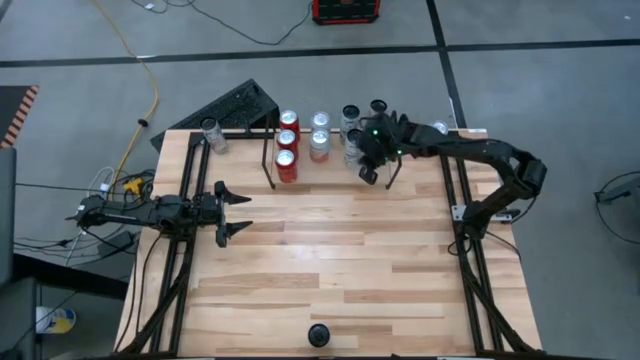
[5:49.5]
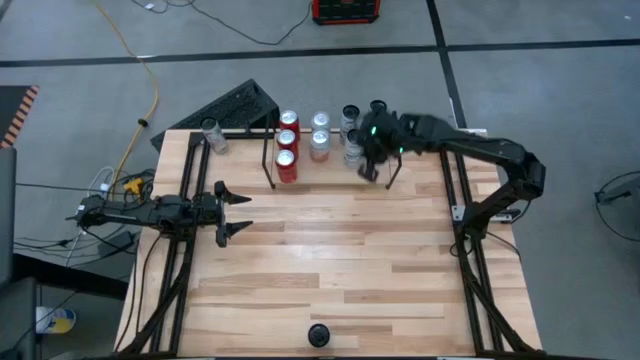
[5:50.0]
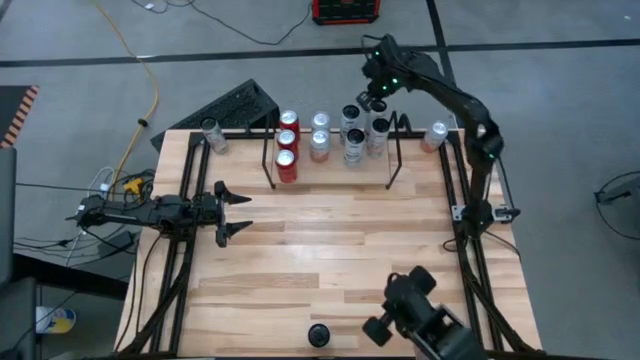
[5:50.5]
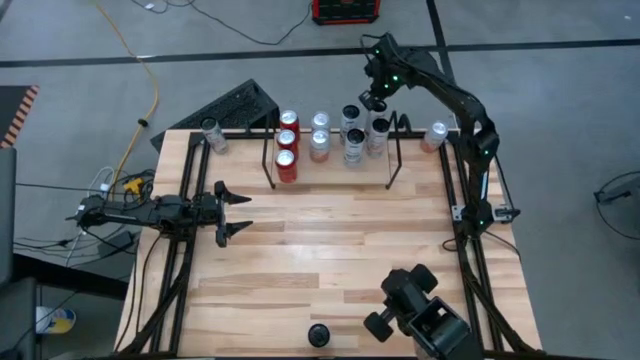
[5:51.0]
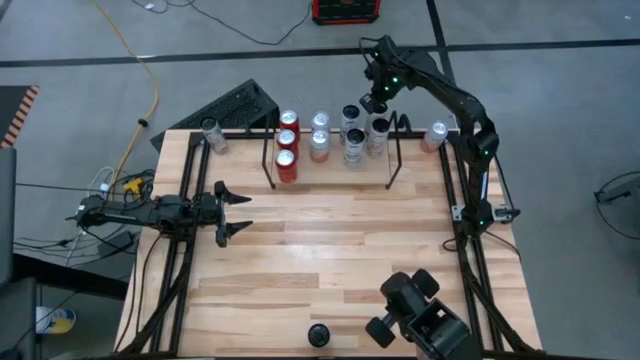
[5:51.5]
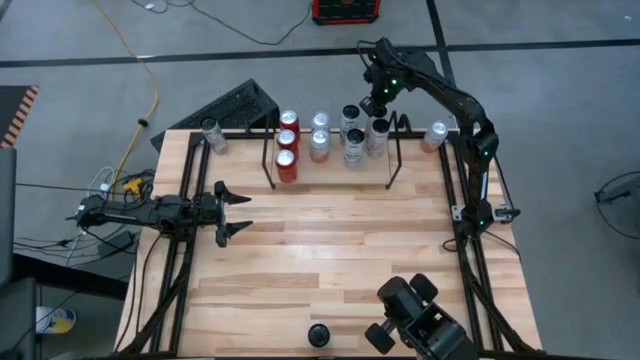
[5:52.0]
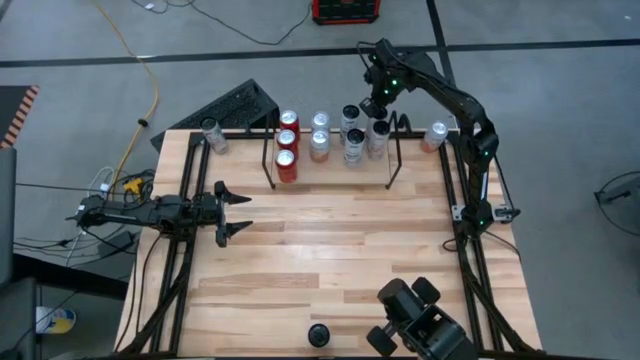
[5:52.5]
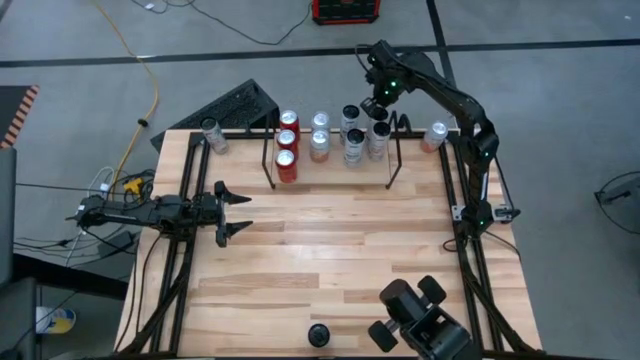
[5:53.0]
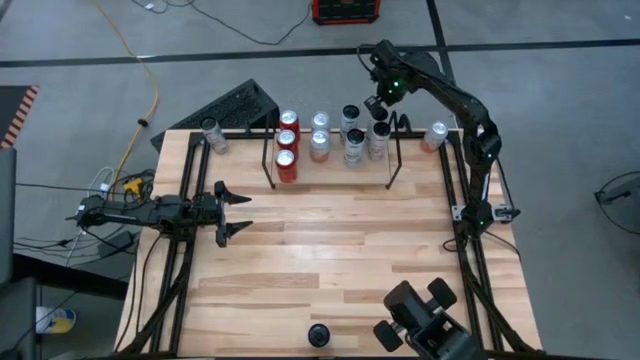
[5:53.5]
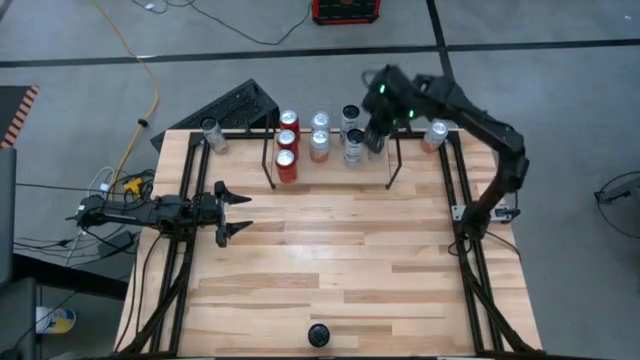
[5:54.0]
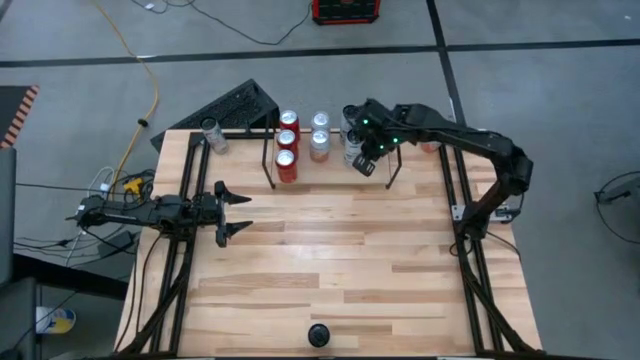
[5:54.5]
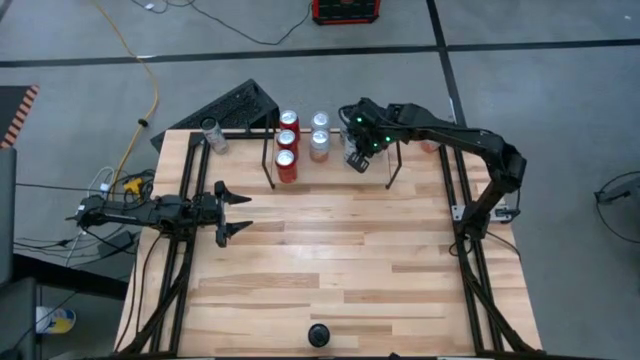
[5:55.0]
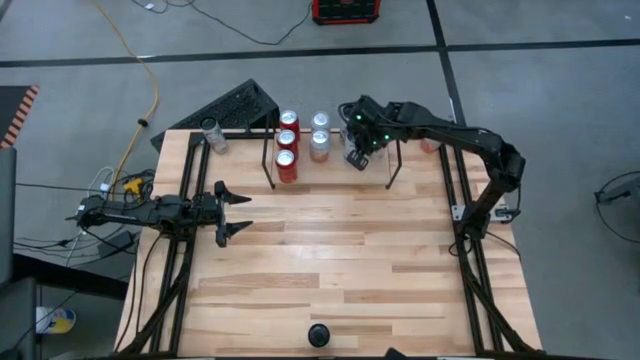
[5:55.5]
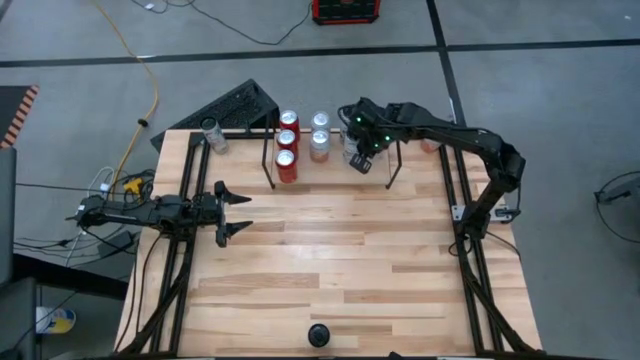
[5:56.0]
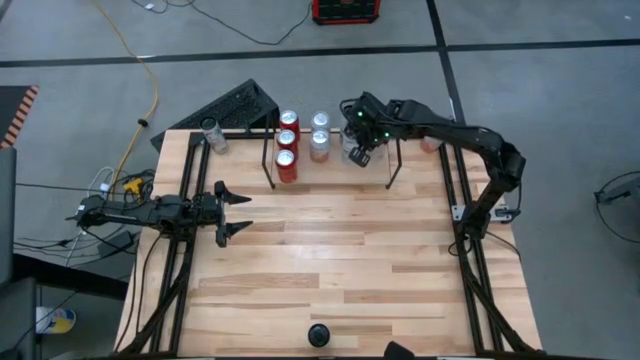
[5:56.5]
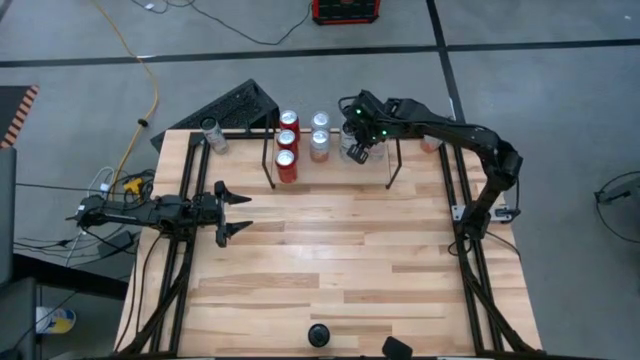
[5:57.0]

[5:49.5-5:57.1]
Task: Place canned beverage on shelf
Adjust the soda cans on the shelf

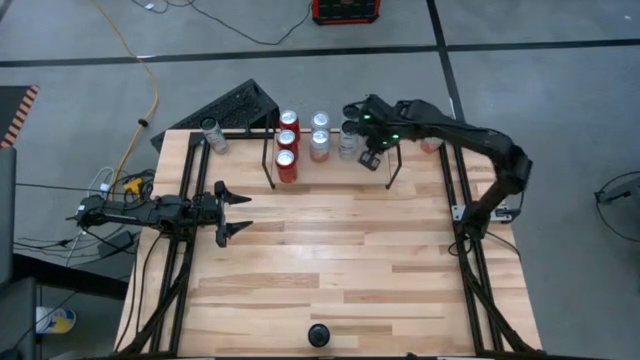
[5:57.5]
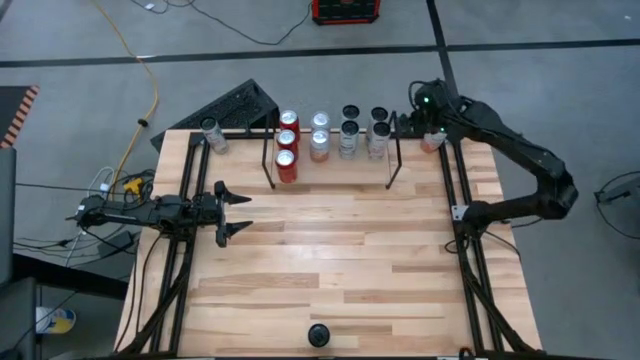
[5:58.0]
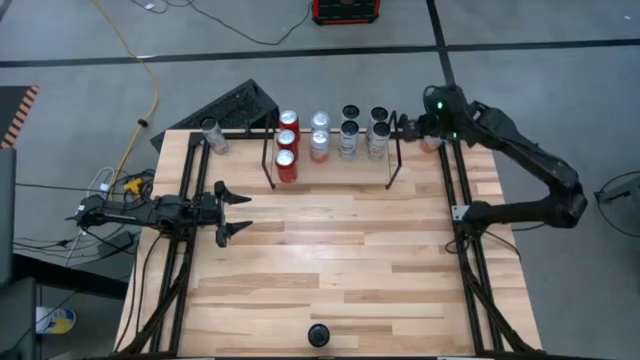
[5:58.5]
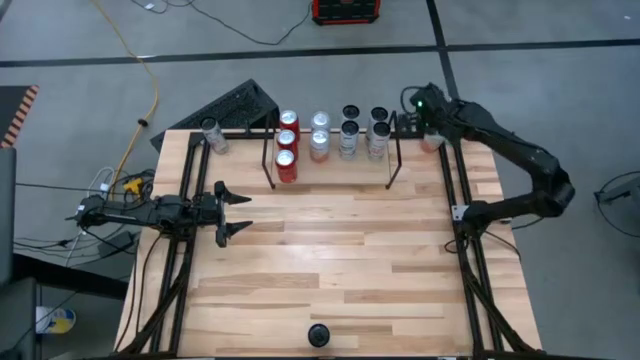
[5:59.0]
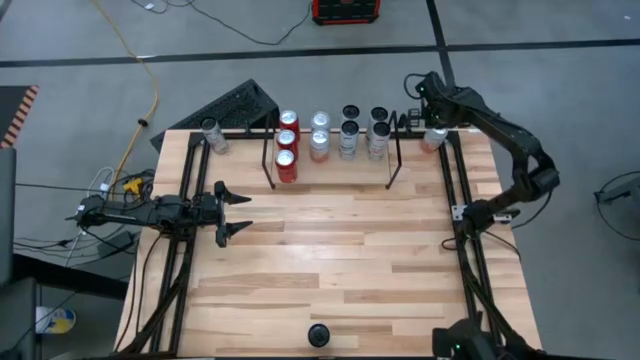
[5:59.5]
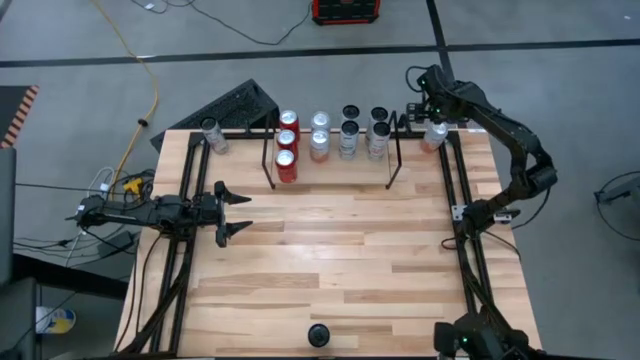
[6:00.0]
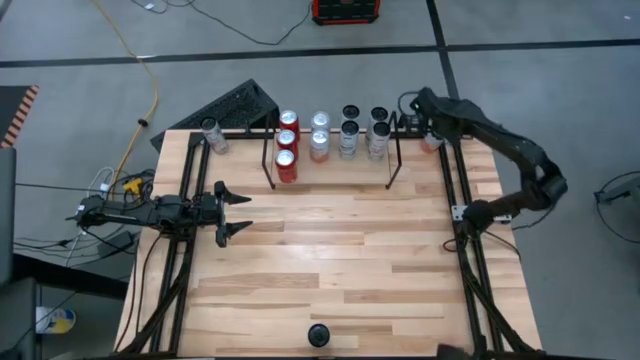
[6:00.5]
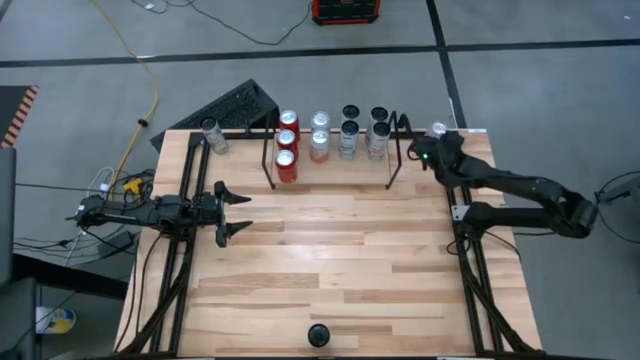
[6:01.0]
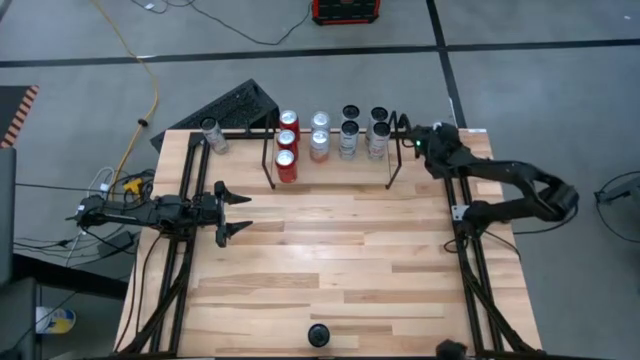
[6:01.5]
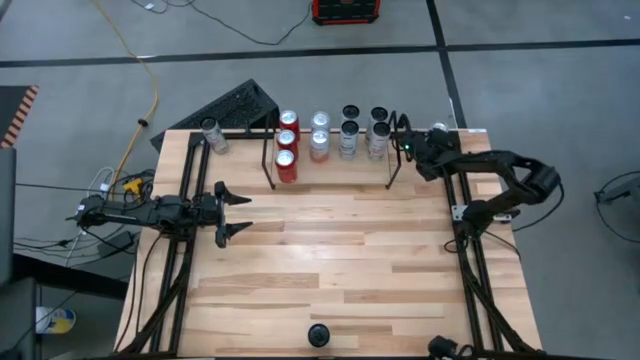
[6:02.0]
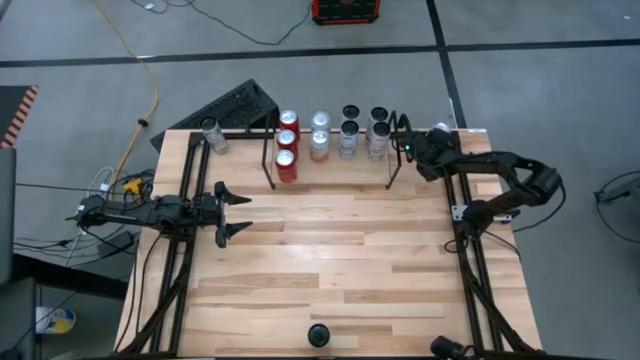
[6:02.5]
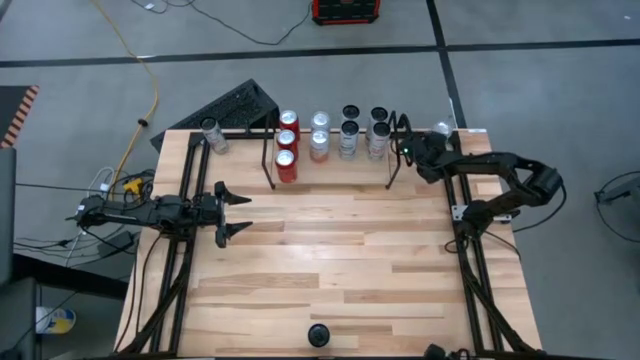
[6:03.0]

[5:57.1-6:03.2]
Put the orange white soda can on the shelf aligned with the other orange white soda can
